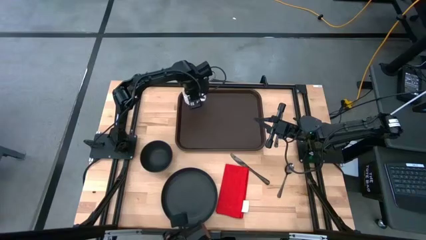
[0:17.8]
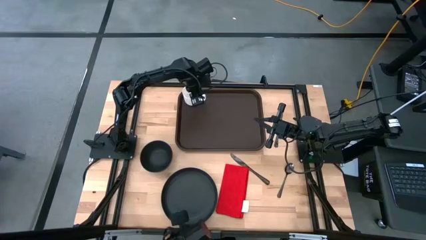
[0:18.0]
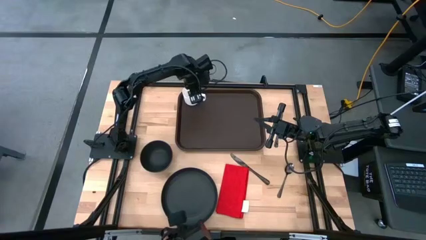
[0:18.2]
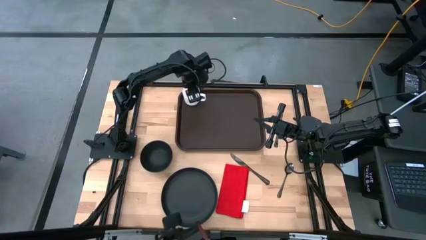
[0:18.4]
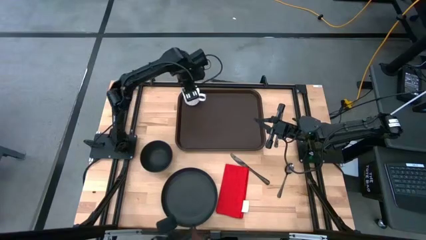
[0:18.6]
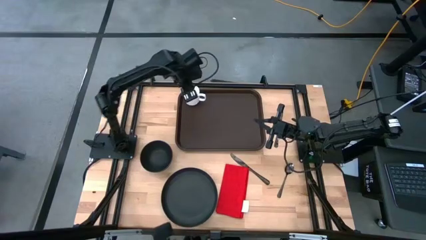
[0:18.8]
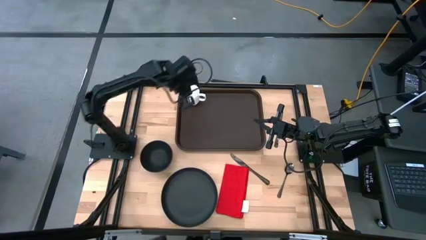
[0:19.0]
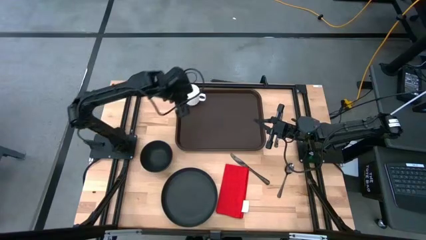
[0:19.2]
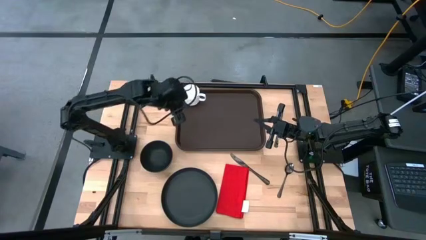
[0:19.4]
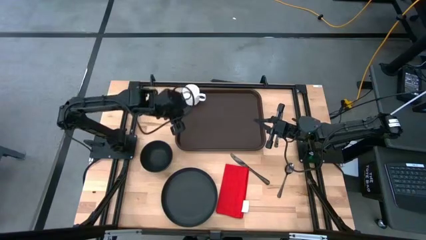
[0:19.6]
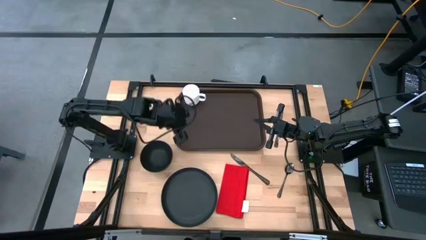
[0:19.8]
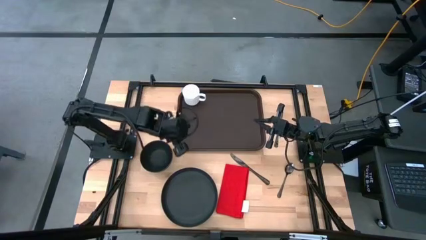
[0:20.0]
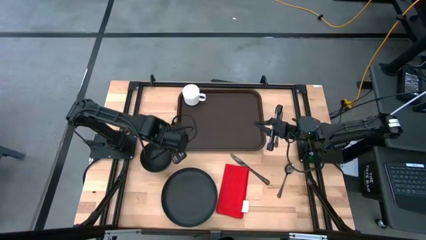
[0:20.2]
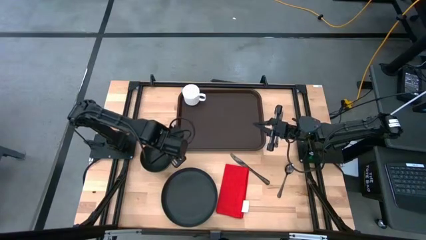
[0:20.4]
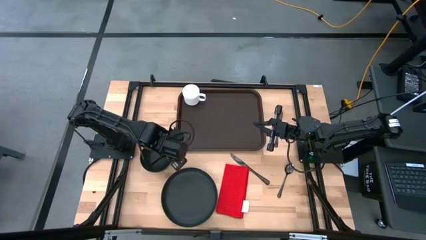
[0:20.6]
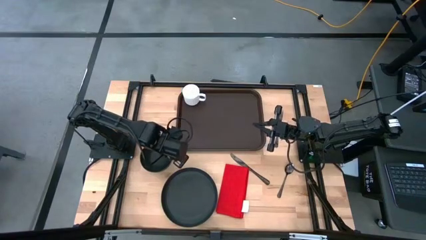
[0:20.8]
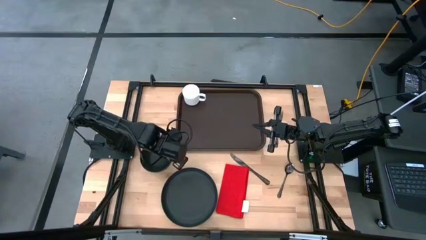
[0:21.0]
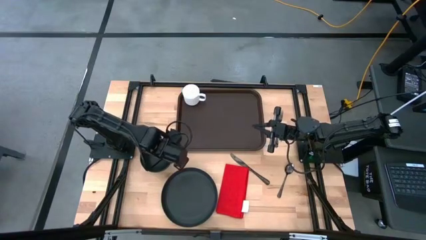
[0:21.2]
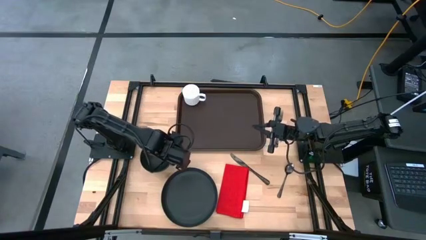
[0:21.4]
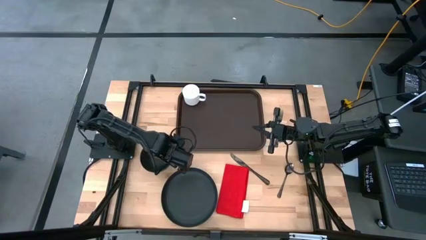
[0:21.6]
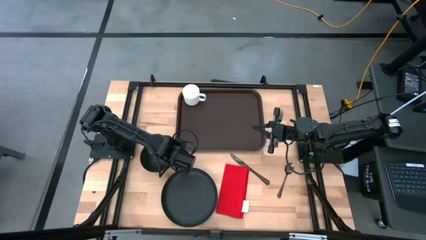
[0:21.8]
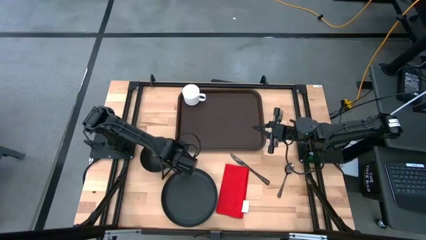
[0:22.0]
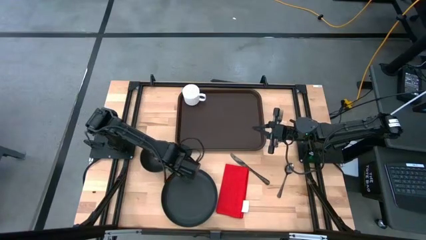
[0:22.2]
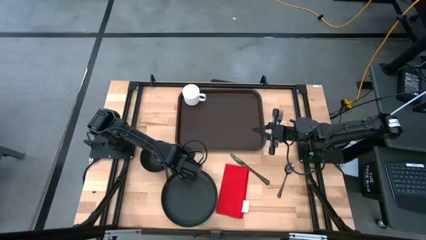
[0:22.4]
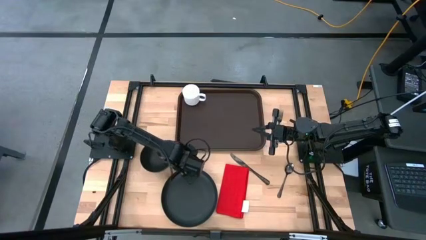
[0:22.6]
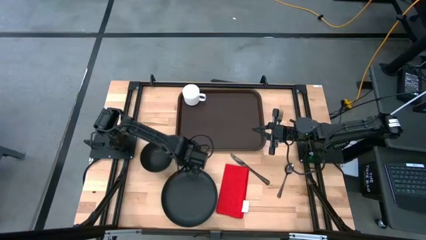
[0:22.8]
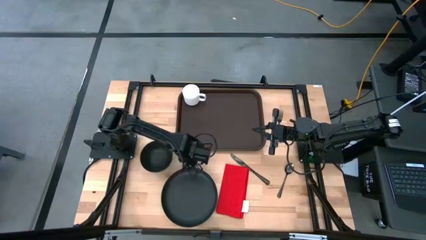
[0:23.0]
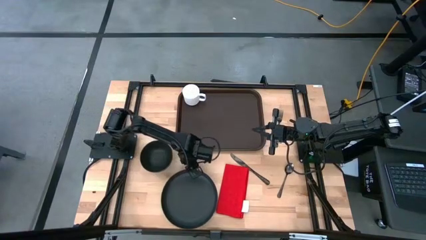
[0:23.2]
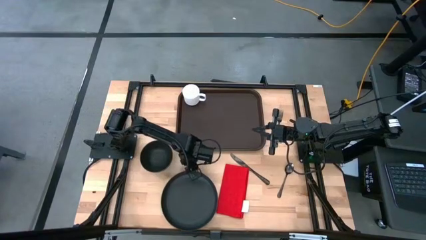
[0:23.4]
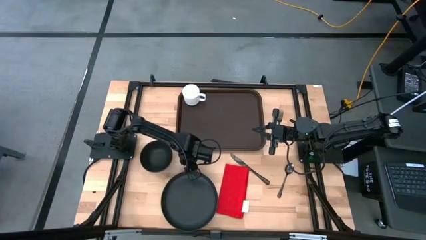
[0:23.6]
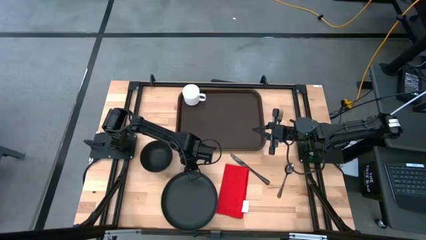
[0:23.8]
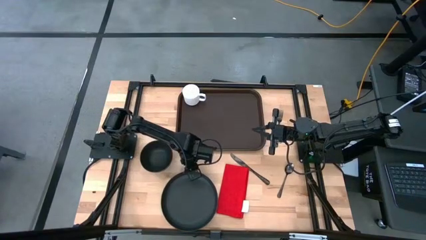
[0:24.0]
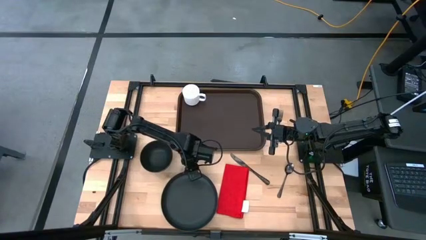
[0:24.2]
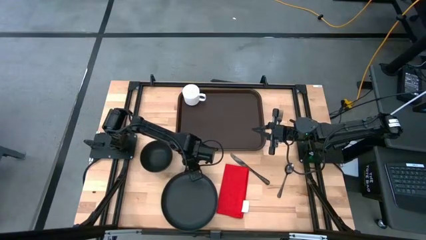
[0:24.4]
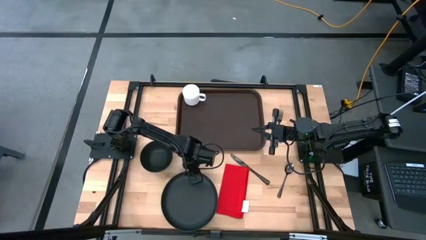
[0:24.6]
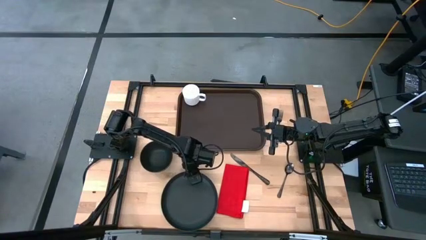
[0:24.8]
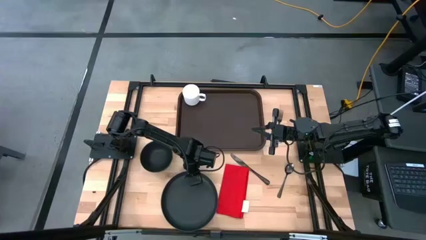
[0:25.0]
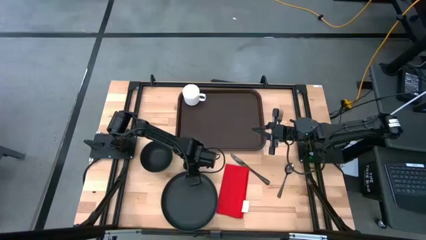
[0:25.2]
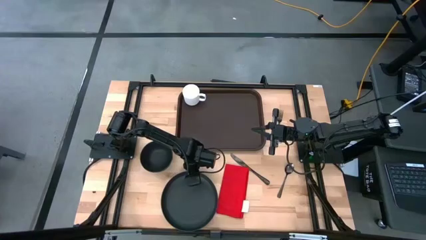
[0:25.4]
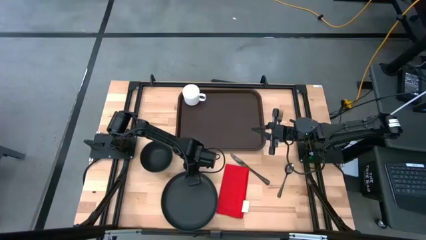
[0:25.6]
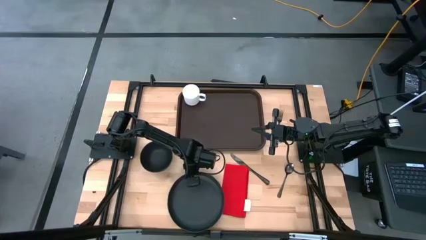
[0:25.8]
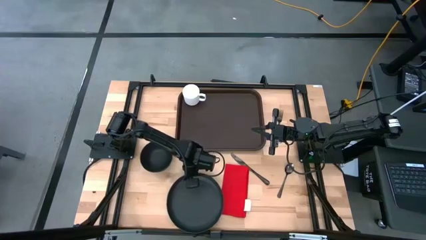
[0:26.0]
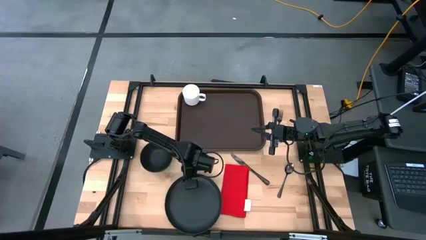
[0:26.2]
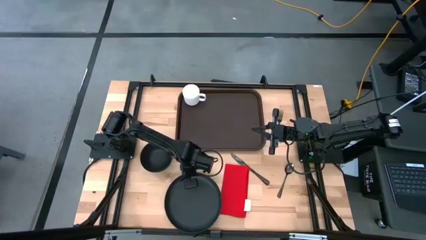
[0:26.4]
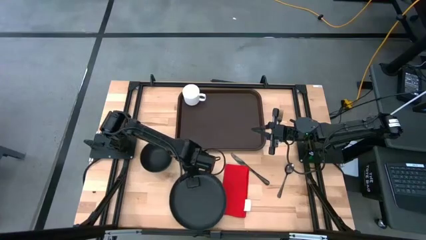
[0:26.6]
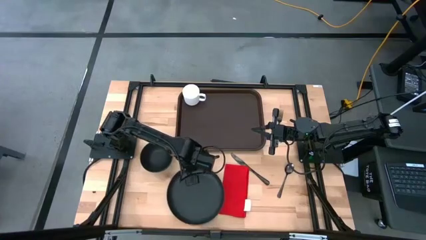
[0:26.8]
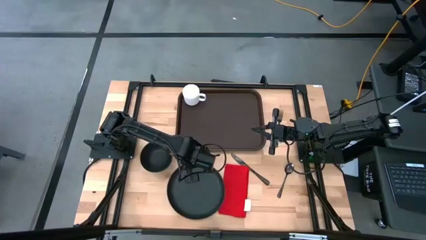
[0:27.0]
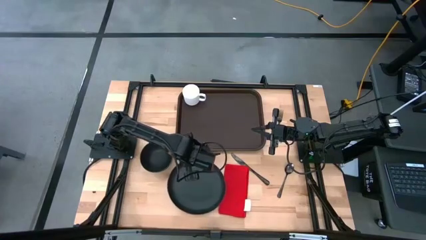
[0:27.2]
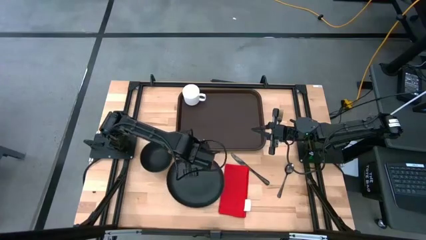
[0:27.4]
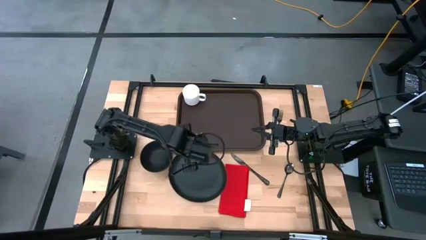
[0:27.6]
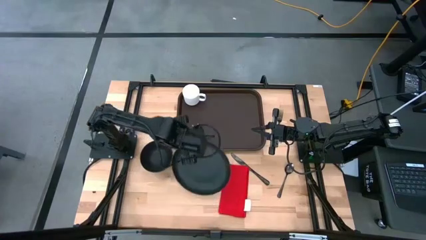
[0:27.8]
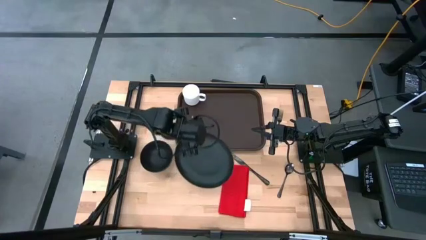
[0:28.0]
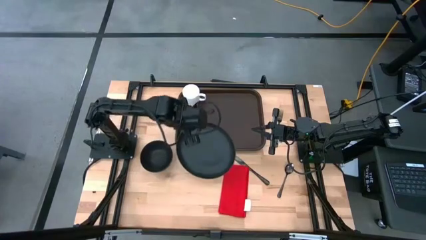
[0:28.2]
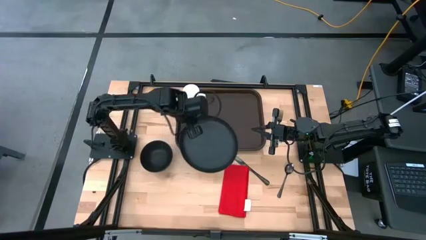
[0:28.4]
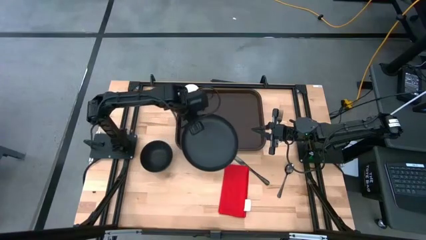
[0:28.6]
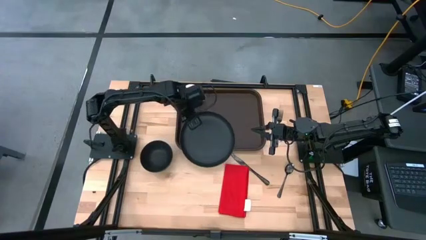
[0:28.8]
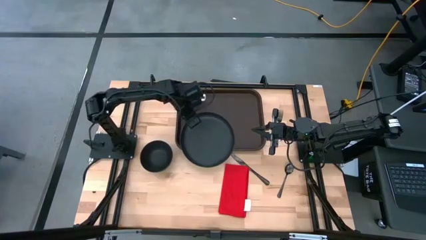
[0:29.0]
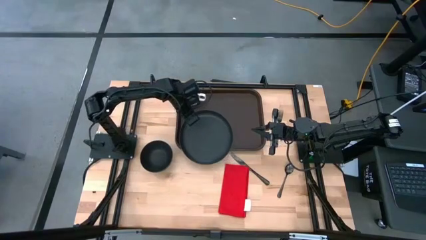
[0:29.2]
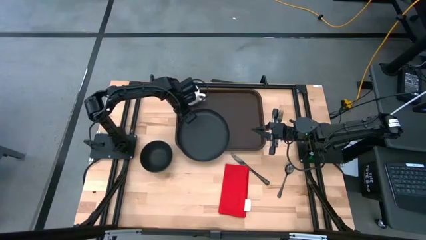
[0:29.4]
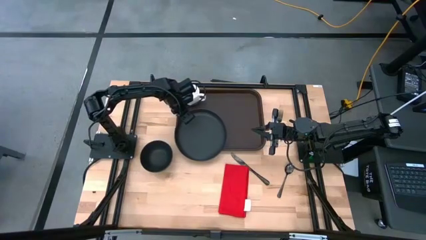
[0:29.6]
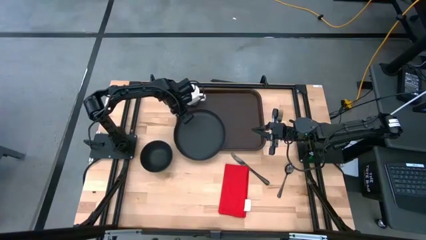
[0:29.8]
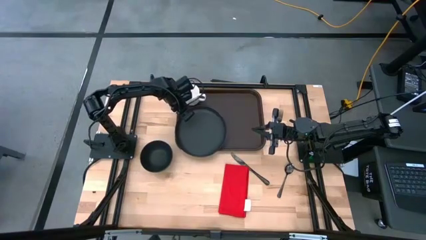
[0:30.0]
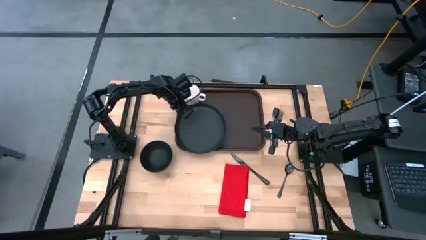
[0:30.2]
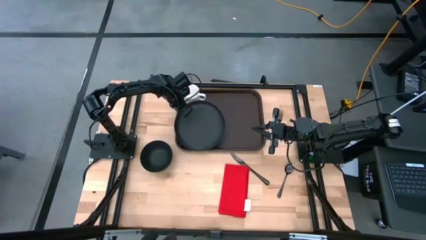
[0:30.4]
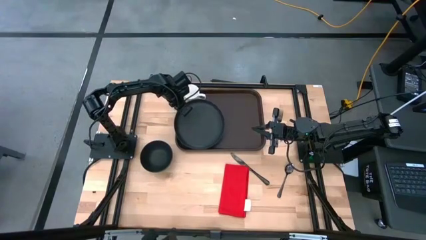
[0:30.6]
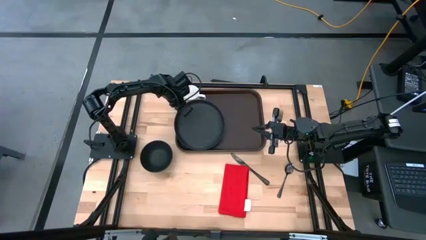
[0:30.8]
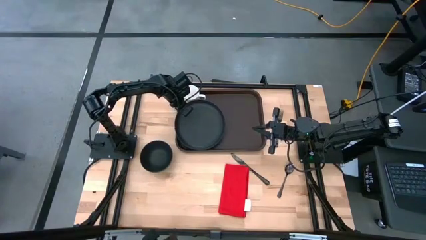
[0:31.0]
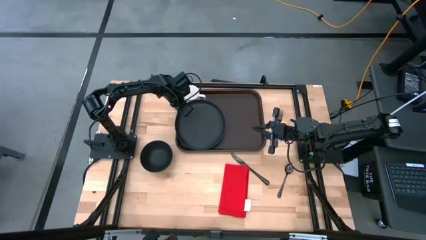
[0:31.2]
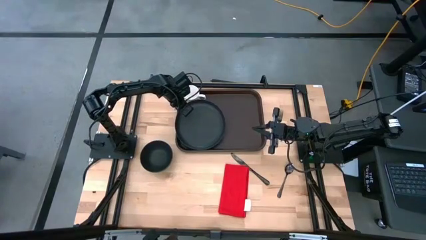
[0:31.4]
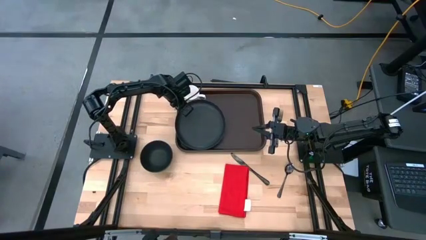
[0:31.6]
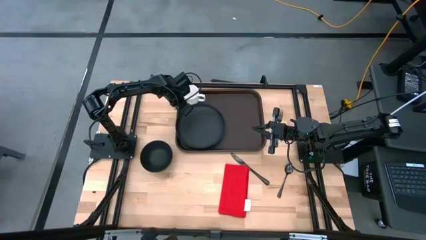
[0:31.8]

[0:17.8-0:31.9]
Task: Set up tray
Put the black plate on the brown serving tray to the bottom right of the white cup
